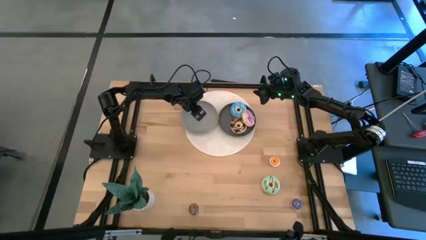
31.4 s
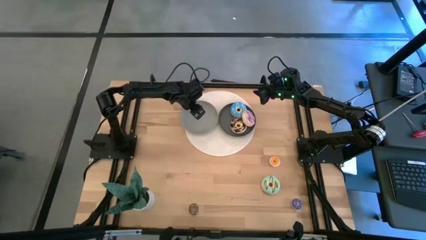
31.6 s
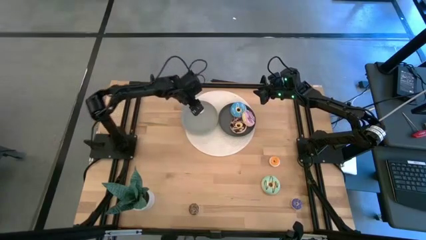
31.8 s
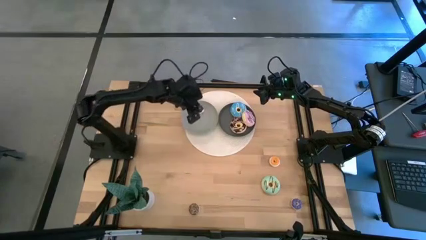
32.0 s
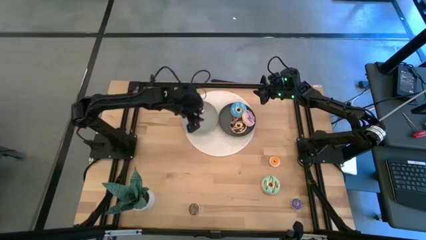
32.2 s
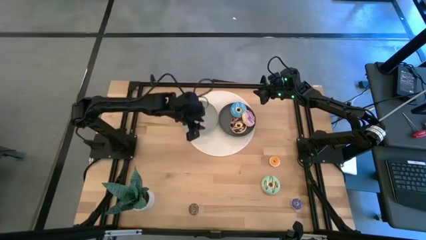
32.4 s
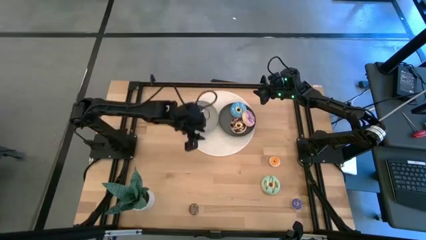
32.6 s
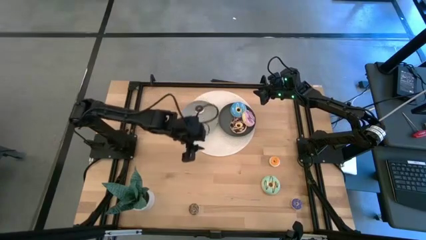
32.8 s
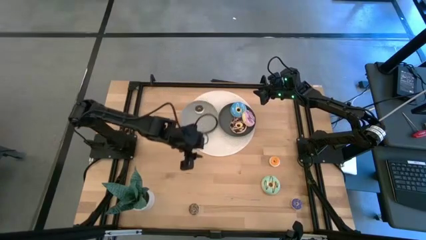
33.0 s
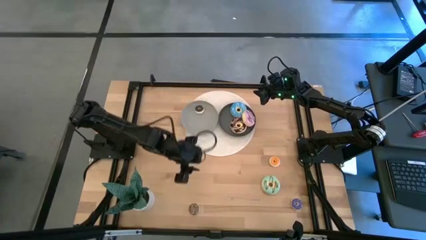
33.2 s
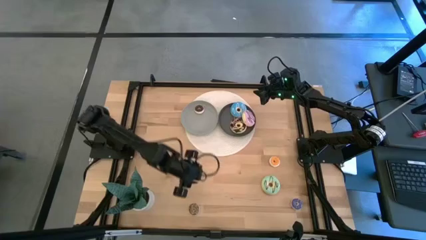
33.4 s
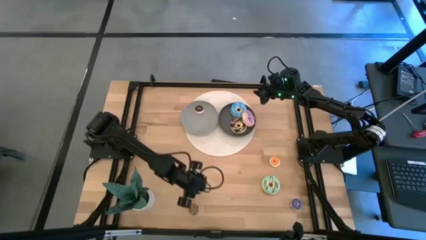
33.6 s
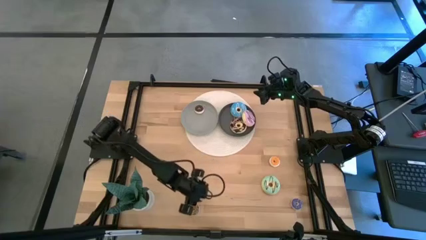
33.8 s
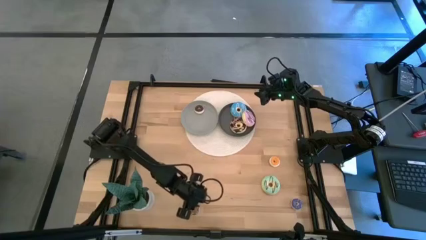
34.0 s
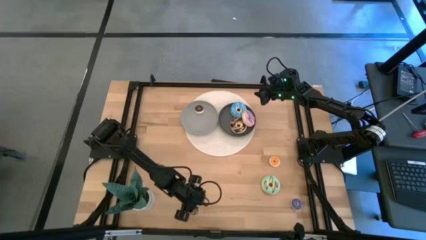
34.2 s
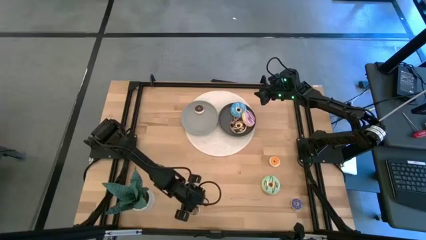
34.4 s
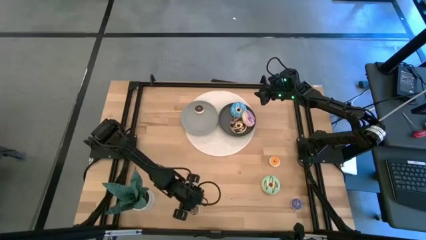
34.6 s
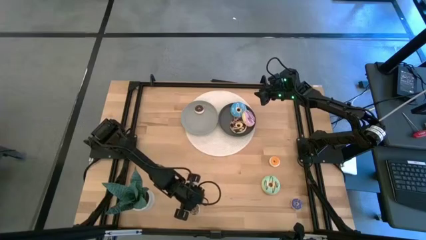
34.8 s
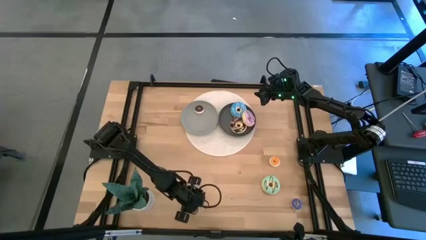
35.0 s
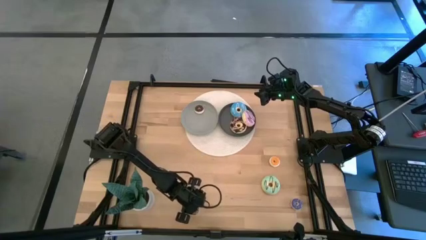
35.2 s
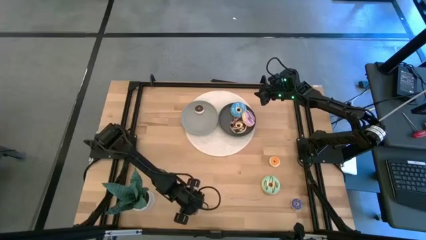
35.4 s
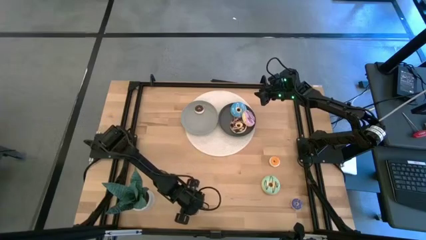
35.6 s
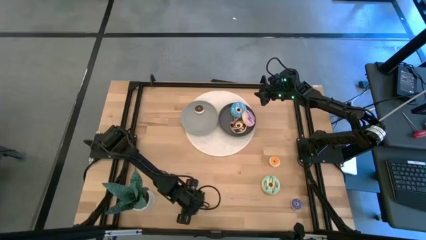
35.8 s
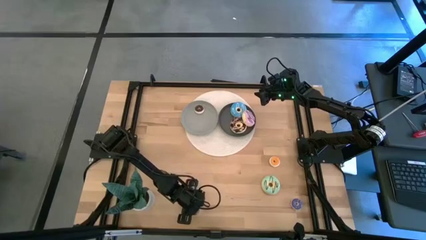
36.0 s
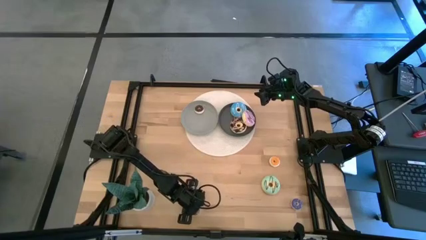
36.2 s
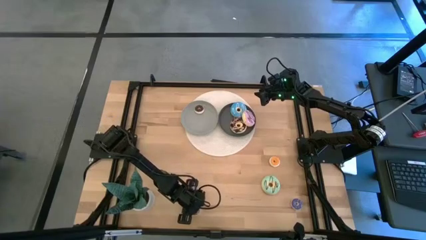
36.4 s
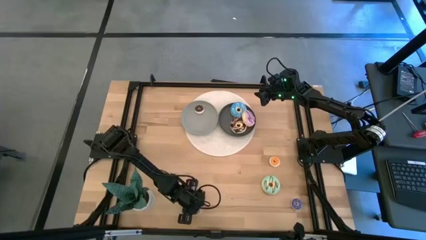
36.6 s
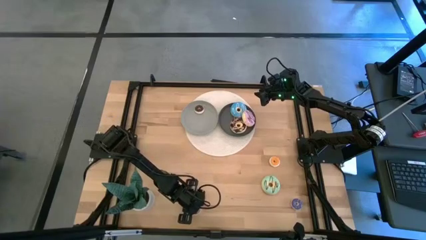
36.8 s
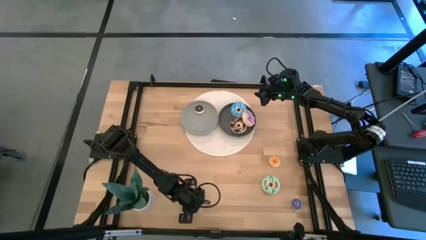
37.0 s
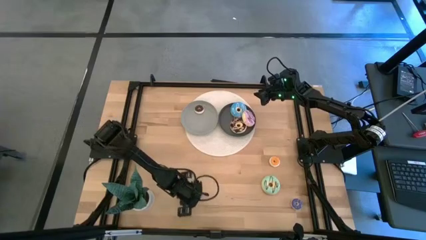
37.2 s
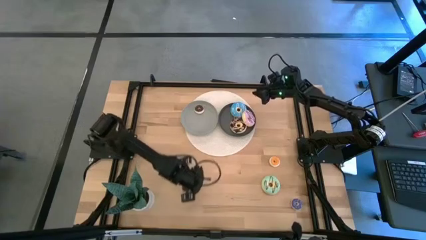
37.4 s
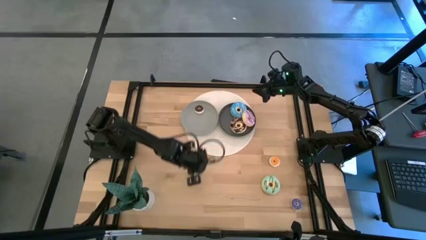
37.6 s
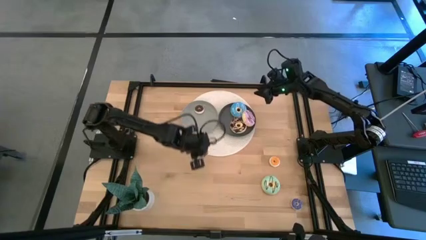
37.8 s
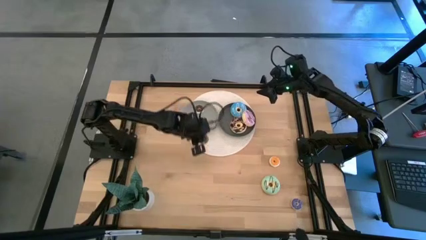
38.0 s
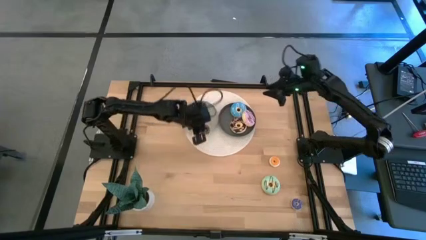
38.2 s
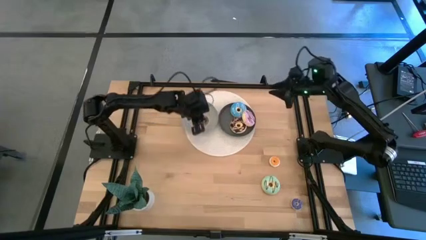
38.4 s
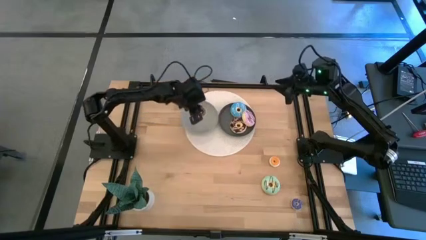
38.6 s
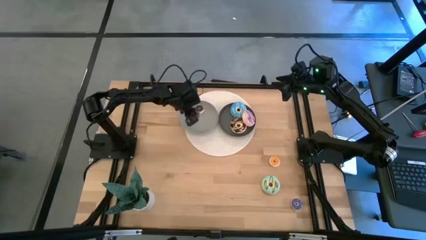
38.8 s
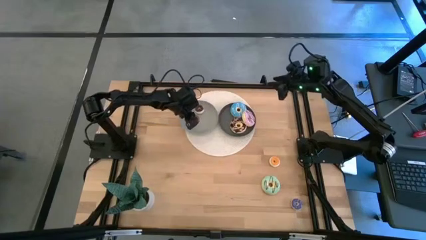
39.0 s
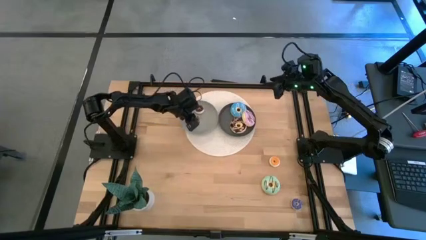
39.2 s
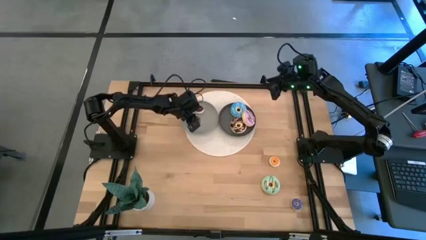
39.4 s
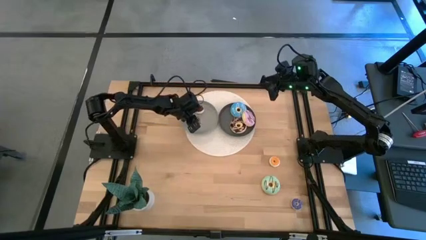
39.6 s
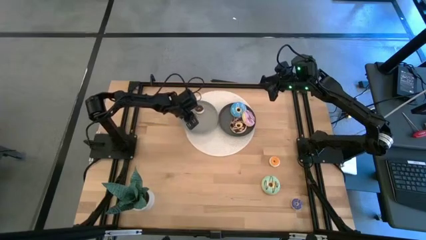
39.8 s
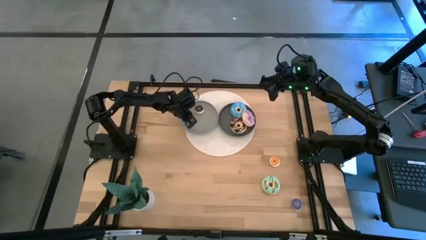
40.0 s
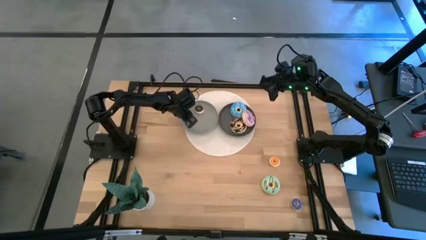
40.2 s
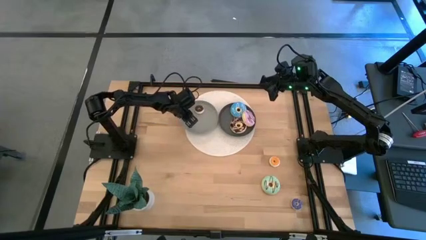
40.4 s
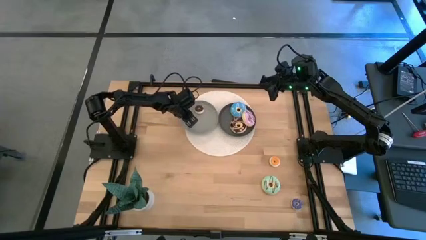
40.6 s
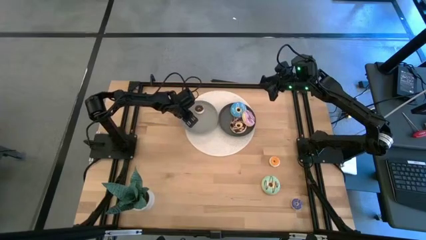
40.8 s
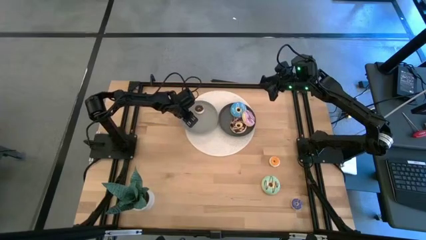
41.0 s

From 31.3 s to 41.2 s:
Task: Pick & Place donuts
Put the small brown donut on the gray plate

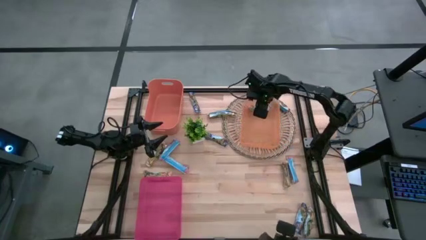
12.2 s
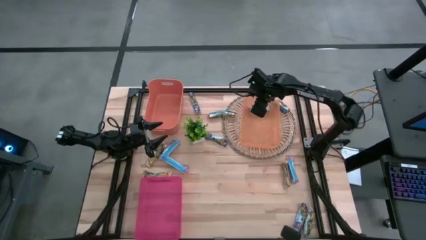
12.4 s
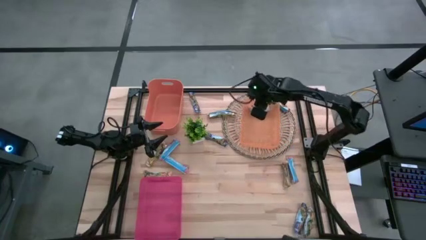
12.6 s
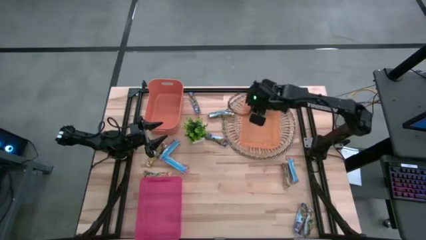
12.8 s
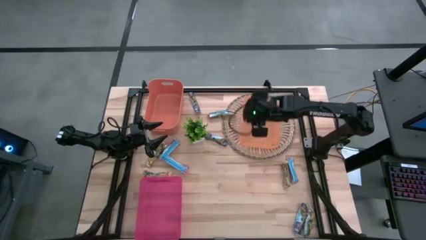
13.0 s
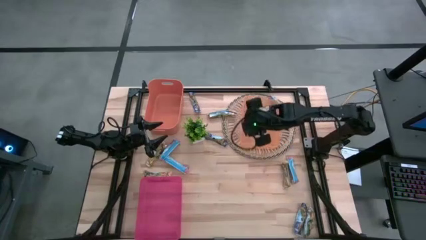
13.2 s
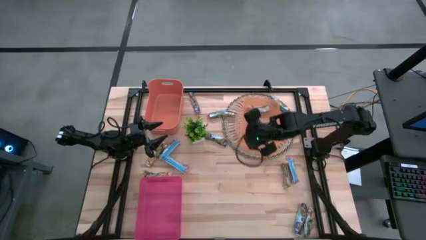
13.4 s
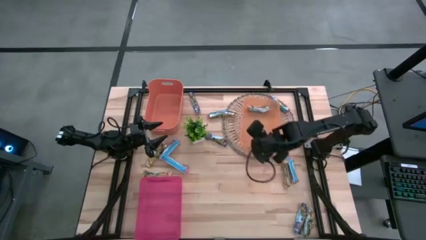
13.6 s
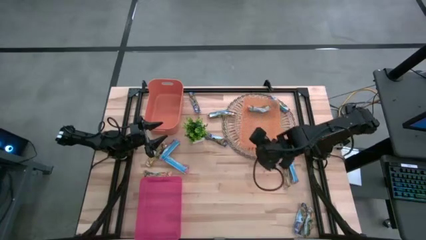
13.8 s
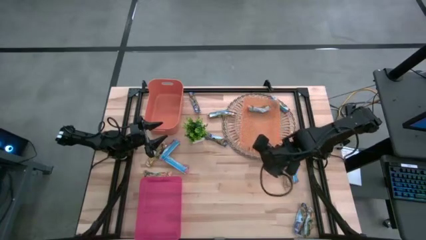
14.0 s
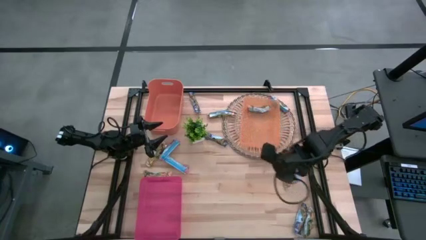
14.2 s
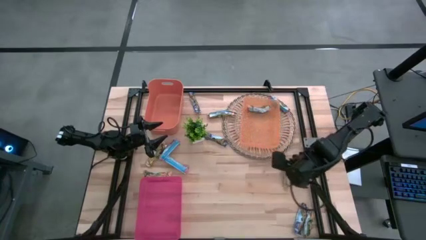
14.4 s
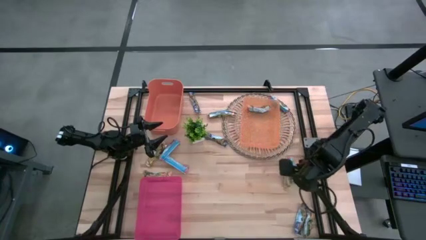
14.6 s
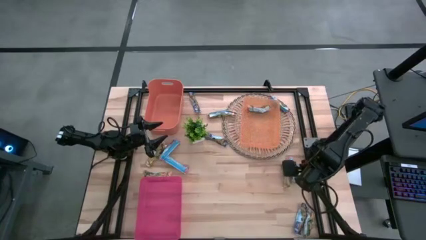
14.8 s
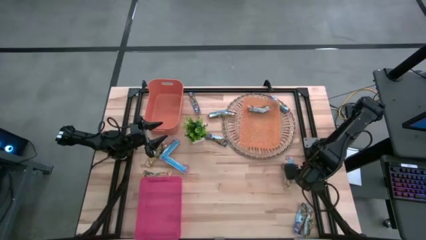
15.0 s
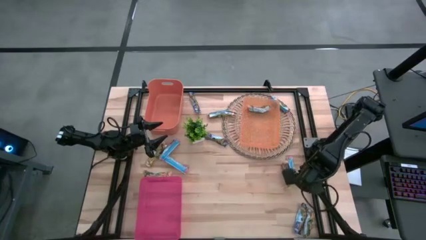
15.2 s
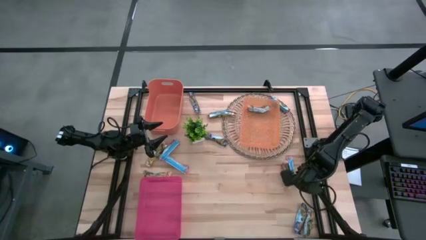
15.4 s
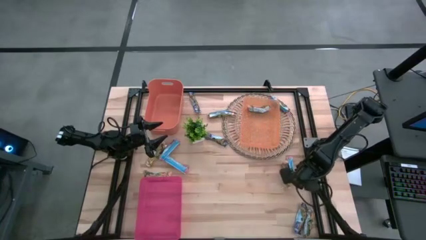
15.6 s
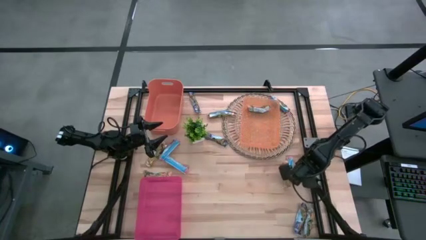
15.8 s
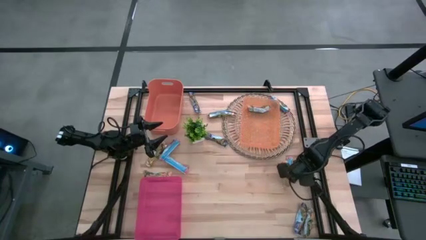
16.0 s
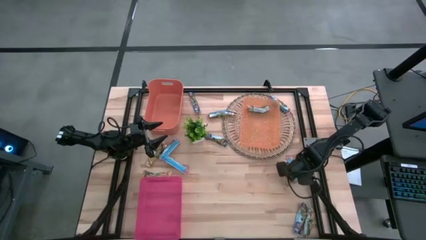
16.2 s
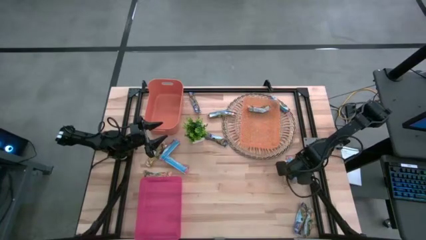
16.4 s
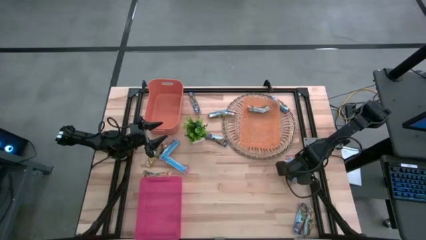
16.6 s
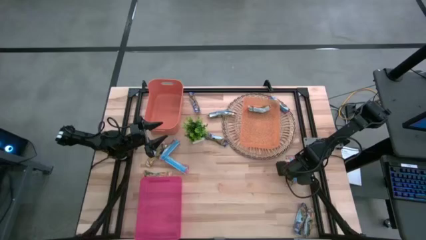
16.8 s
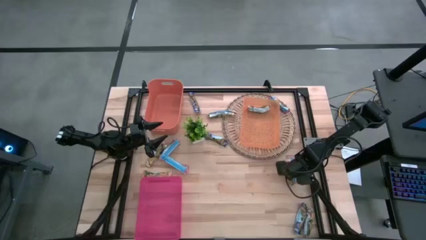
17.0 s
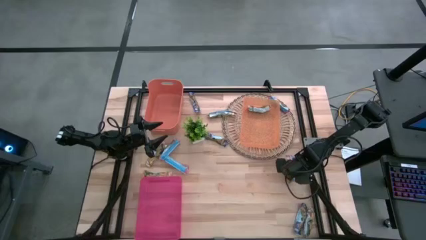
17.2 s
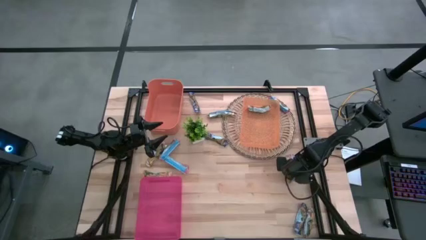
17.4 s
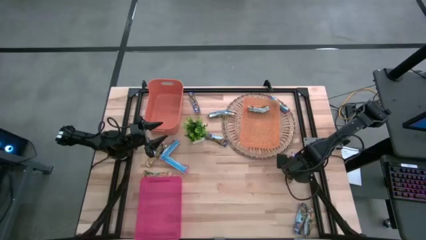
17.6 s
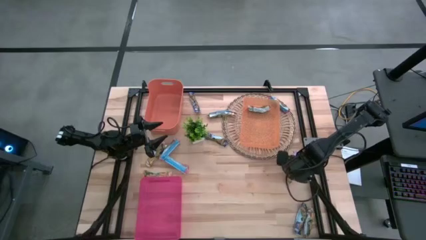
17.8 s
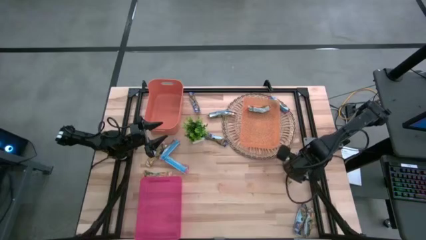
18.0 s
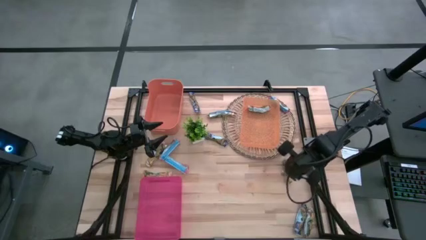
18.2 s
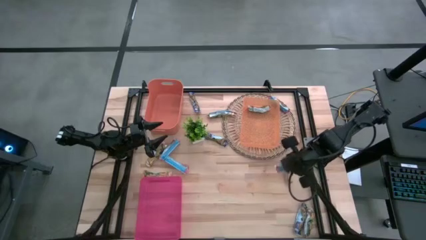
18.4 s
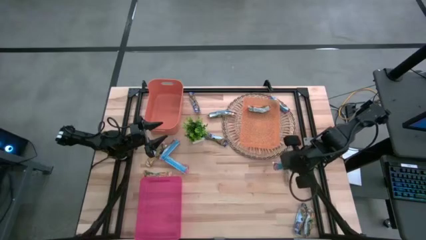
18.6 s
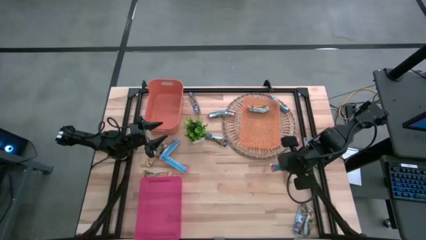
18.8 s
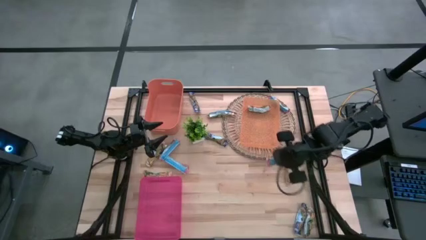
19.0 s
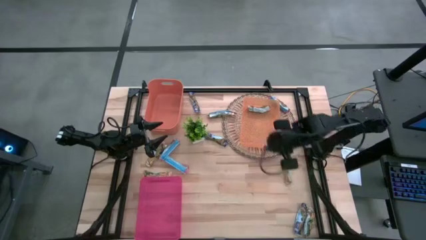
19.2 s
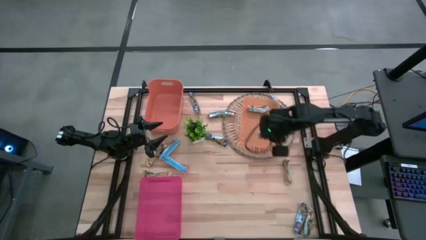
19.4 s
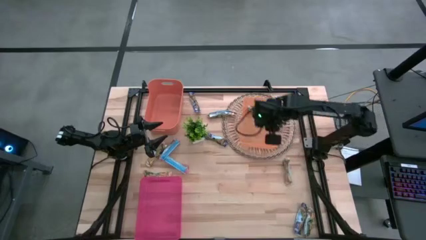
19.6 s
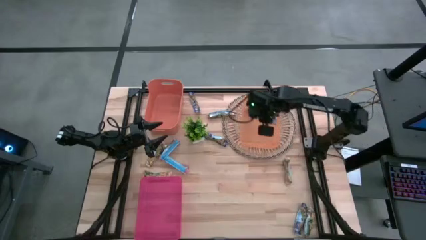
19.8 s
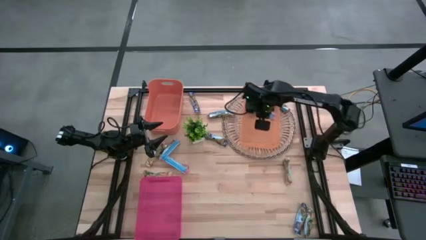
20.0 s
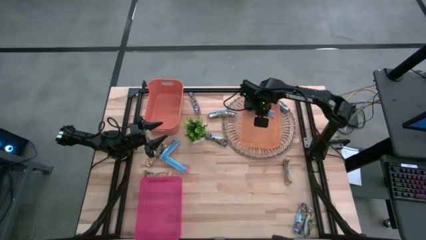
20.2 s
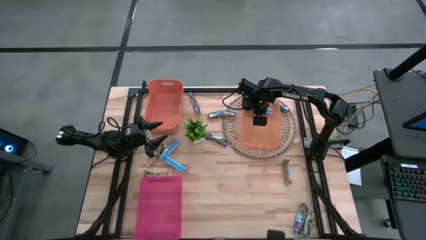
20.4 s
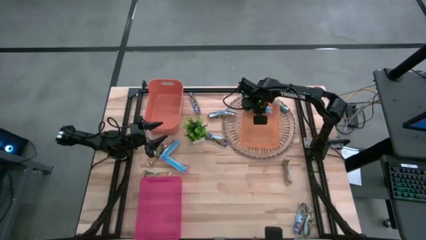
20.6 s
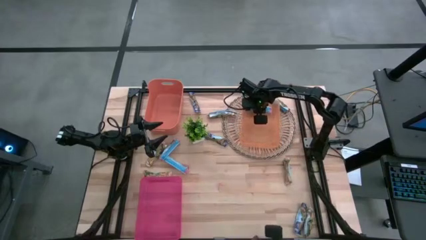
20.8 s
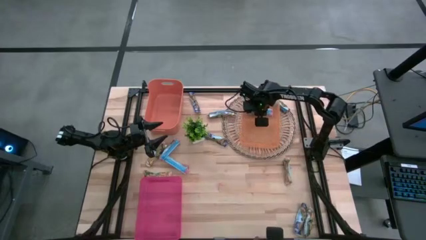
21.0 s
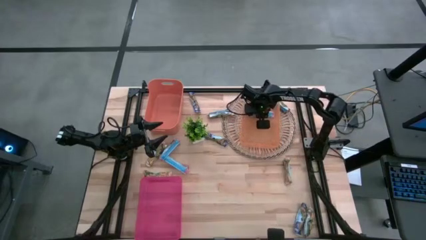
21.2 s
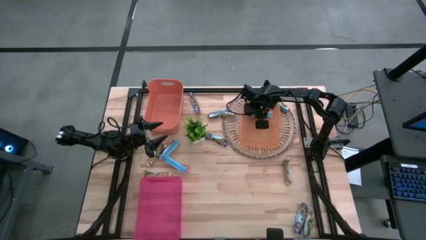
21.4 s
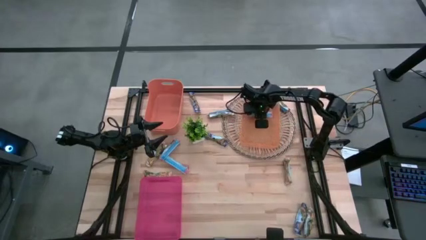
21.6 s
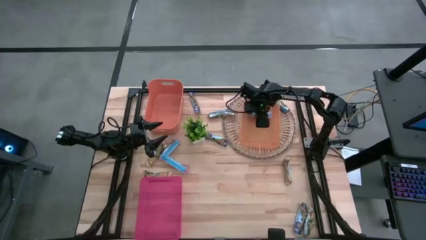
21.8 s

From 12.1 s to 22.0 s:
Task: Pick and place Granola Bars by type
Put the red granola bar into the right orange bin
